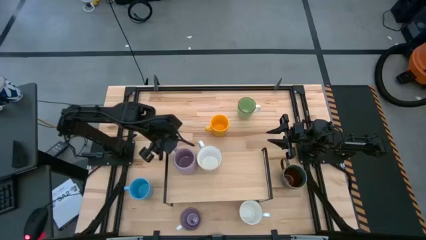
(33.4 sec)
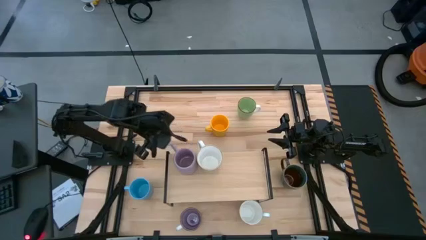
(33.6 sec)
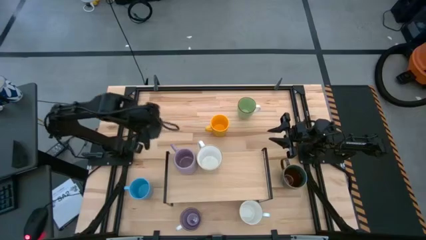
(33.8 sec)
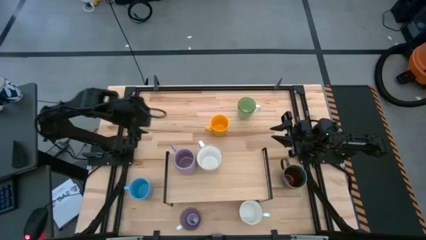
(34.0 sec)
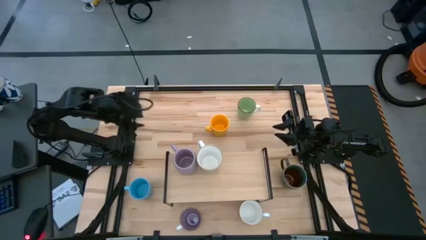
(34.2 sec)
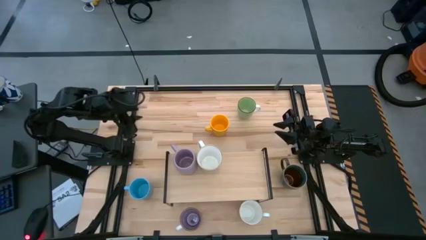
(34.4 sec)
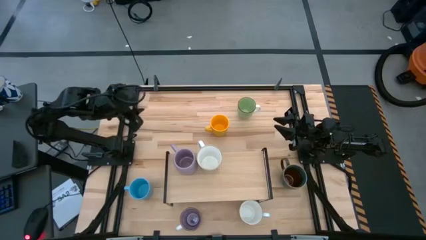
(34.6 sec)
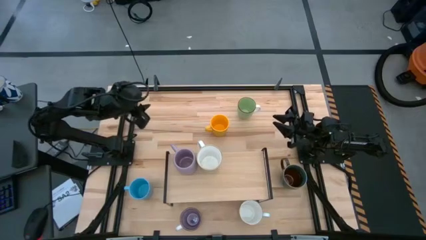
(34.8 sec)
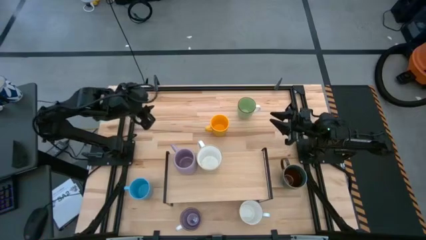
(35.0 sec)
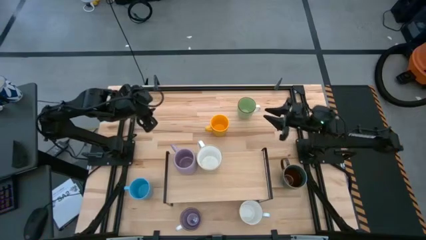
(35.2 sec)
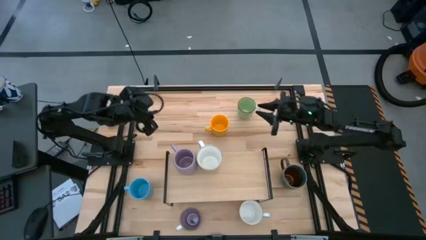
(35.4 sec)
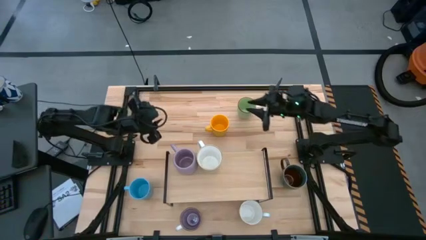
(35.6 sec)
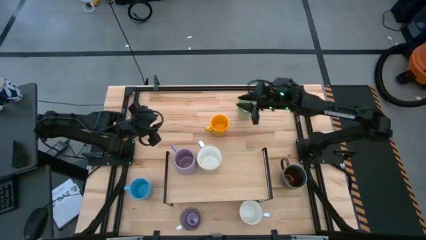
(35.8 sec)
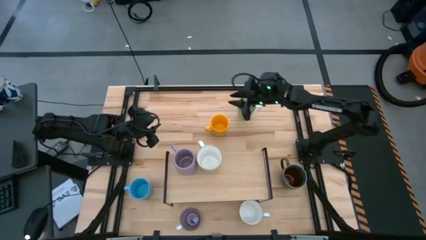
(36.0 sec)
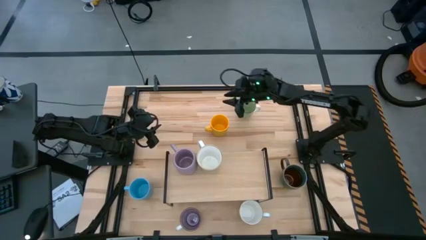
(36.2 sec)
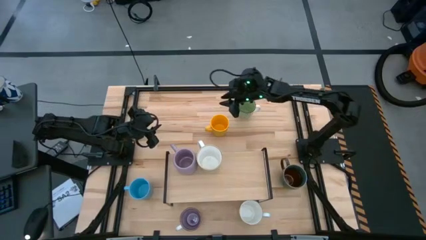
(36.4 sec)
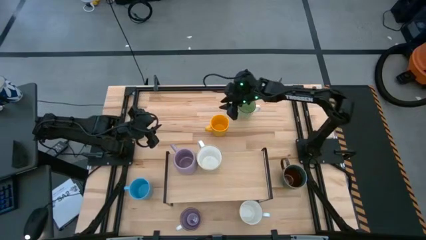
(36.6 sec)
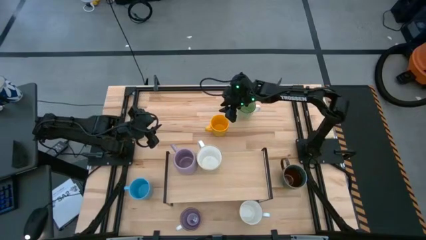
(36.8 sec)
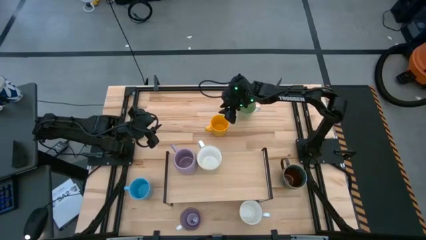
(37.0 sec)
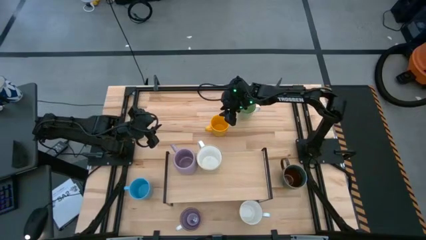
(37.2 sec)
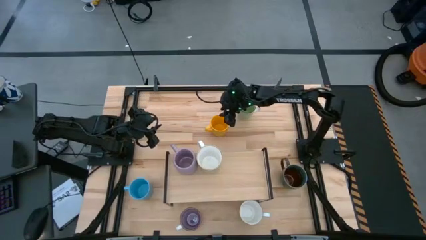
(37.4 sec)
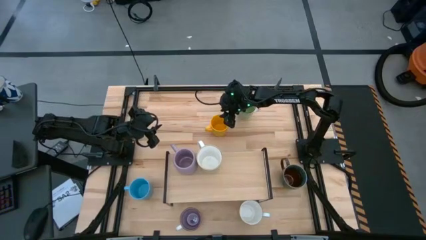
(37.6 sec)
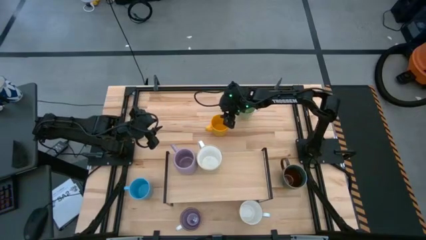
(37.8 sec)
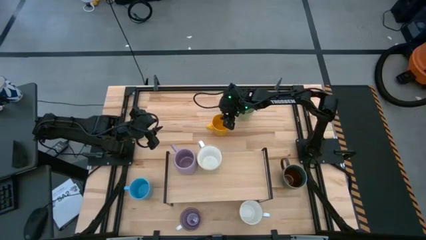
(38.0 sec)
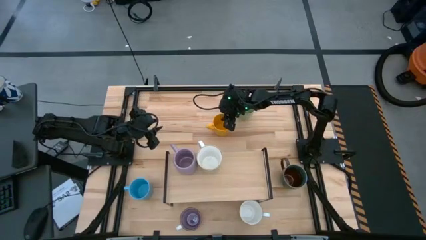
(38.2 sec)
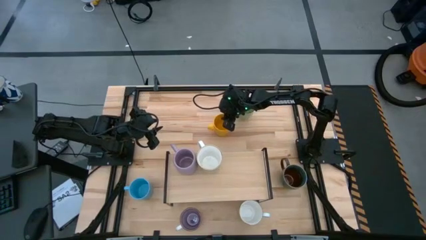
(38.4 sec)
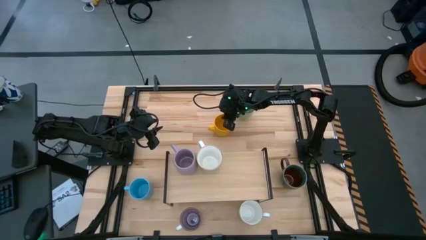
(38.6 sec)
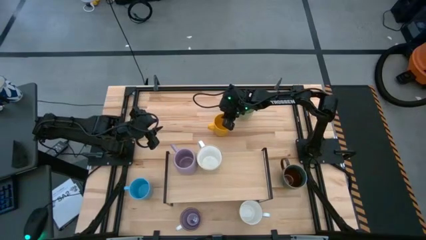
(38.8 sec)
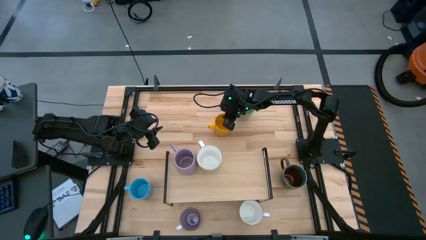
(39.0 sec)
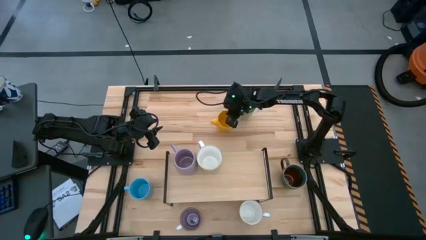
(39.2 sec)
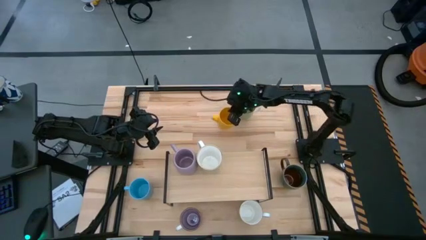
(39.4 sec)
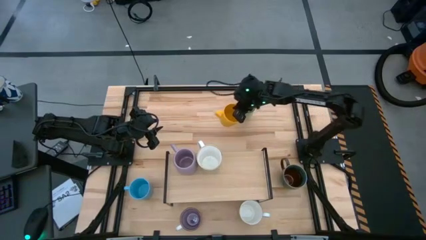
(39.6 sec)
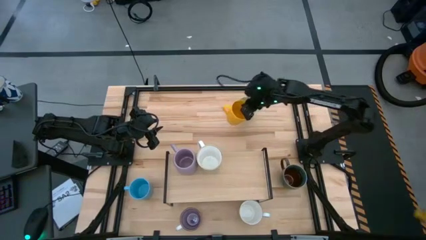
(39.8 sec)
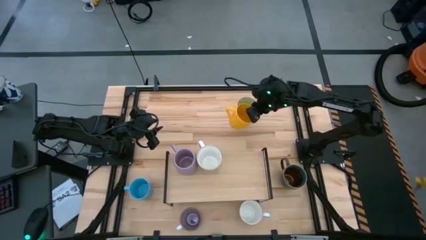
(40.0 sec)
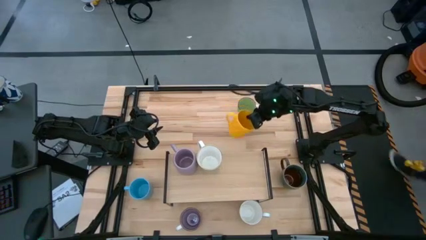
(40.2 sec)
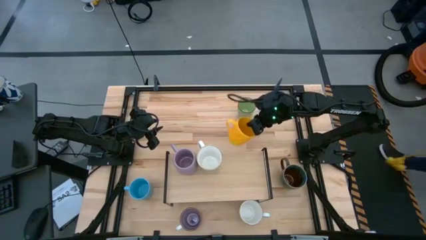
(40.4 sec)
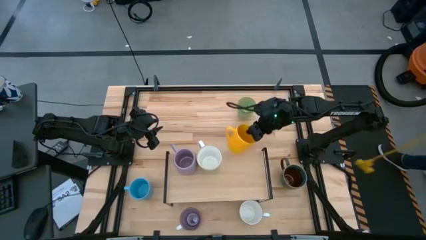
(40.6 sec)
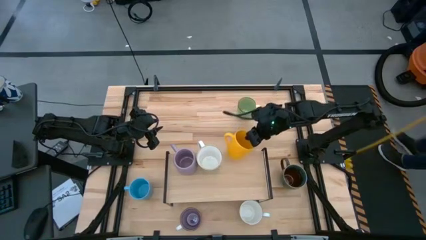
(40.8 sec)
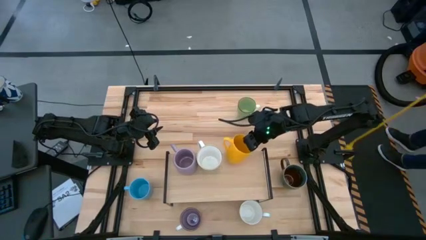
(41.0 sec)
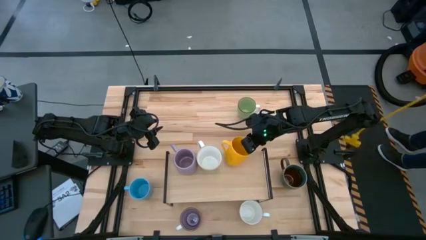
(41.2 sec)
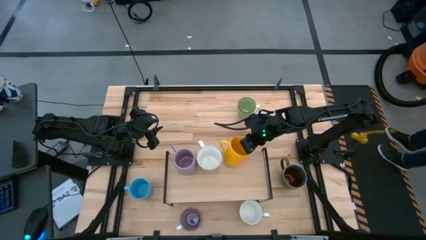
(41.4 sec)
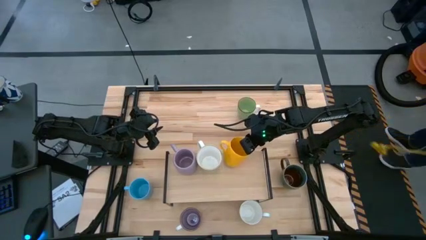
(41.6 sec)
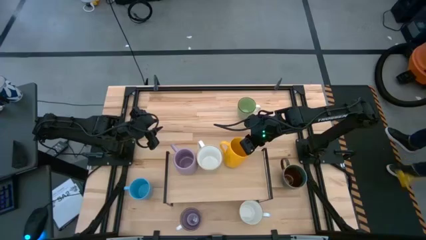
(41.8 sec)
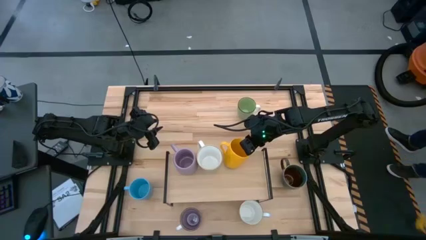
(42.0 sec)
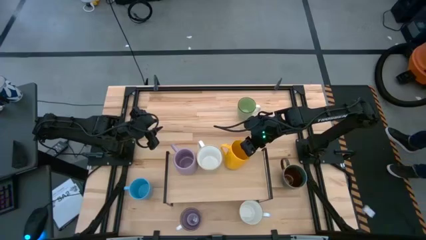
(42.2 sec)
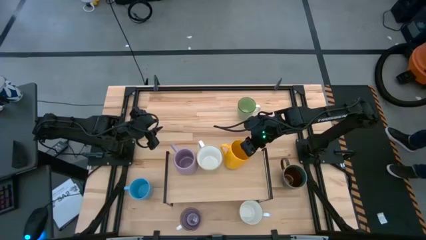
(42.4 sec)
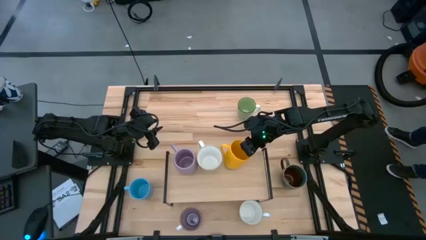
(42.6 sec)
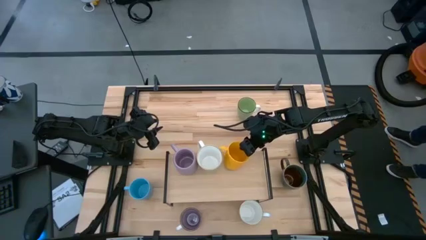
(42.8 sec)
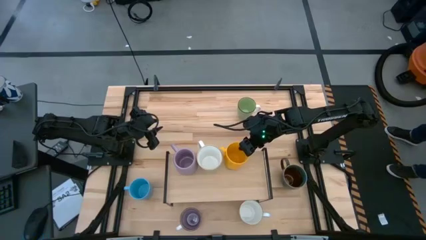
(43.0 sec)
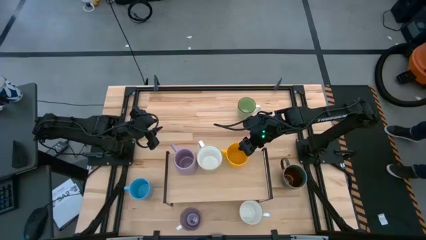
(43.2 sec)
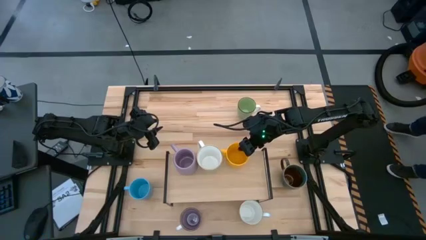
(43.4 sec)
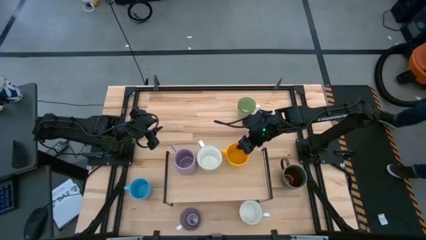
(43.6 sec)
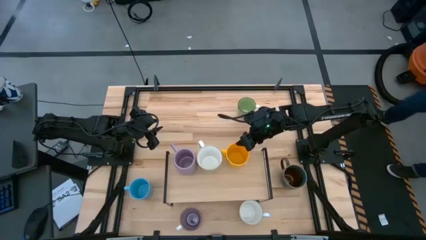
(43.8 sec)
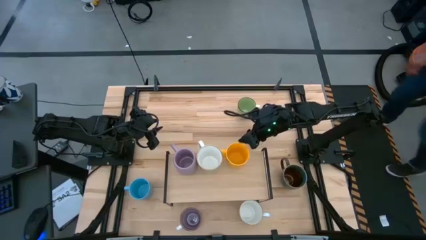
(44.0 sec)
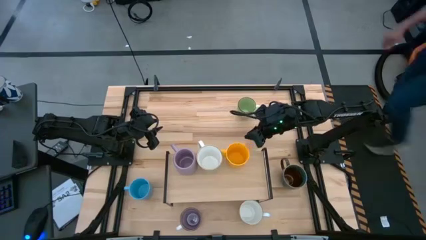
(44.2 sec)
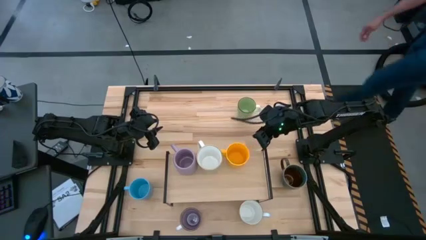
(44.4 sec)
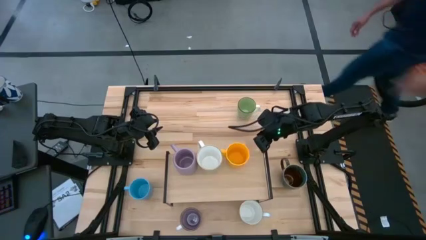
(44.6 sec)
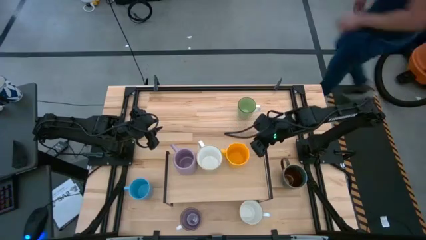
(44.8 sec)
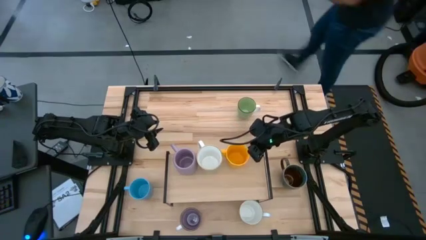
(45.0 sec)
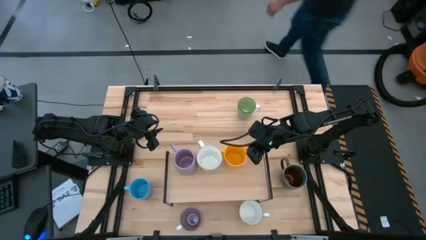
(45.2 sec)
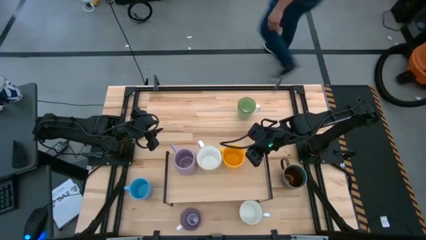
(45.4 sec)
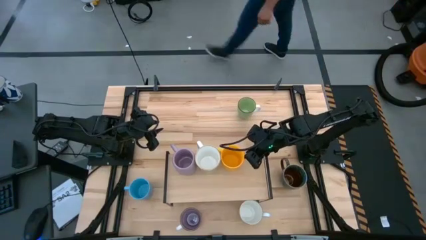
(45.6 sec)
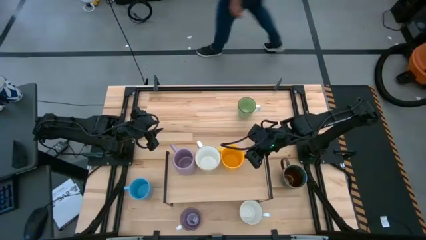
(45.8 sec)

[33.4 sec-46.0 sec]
Task: Place coffee mugs
Put the yellow mug on the shelf

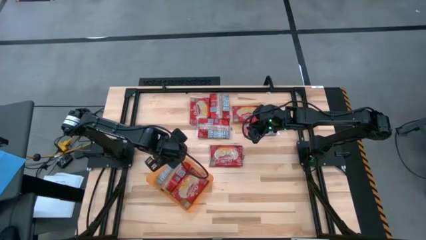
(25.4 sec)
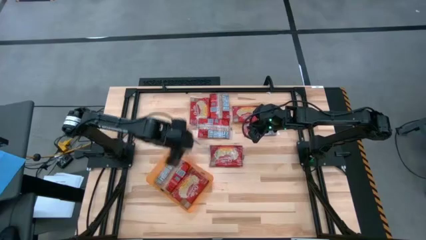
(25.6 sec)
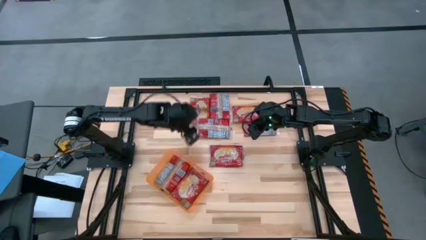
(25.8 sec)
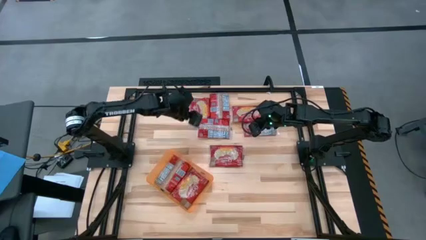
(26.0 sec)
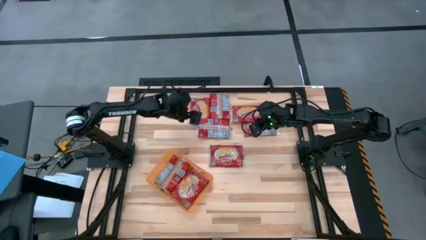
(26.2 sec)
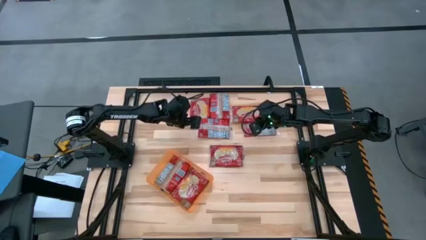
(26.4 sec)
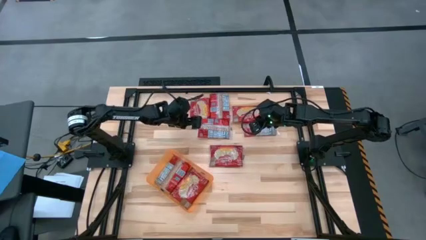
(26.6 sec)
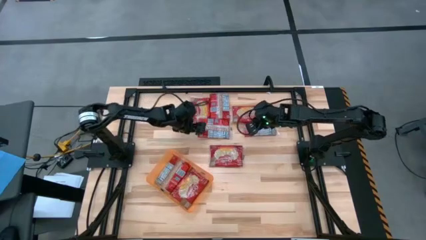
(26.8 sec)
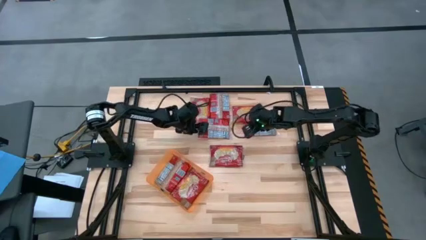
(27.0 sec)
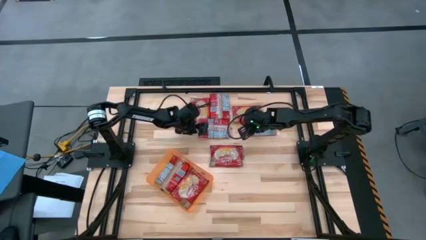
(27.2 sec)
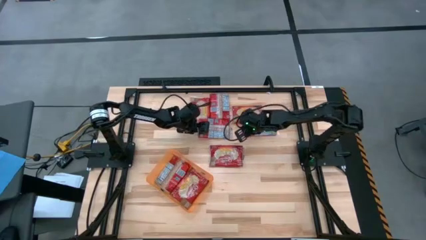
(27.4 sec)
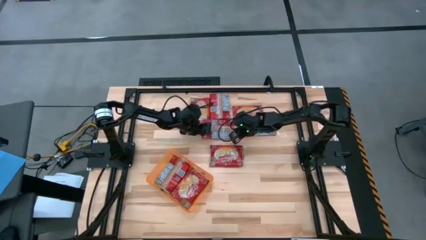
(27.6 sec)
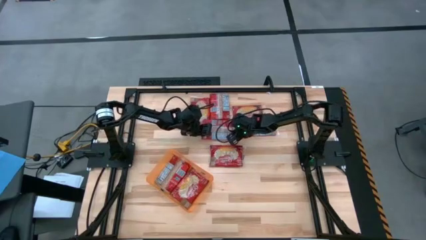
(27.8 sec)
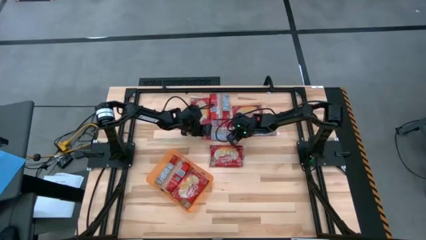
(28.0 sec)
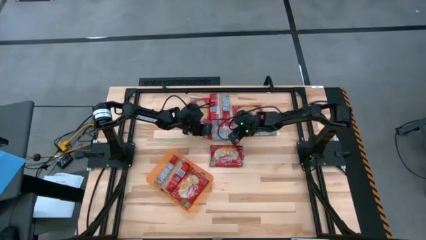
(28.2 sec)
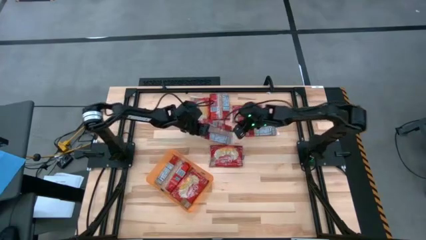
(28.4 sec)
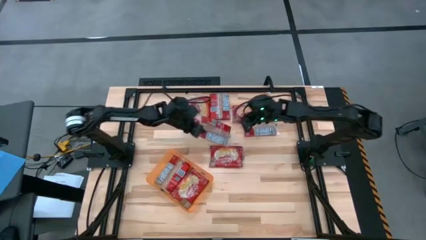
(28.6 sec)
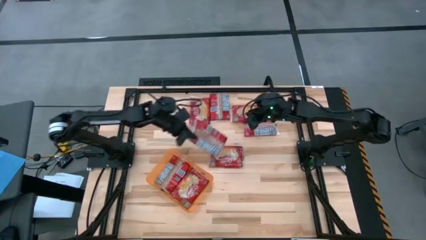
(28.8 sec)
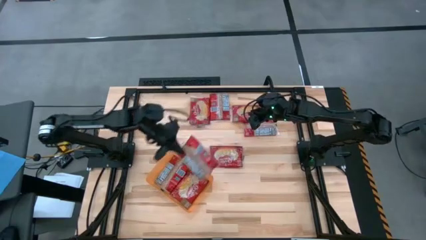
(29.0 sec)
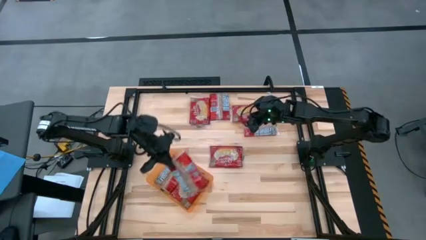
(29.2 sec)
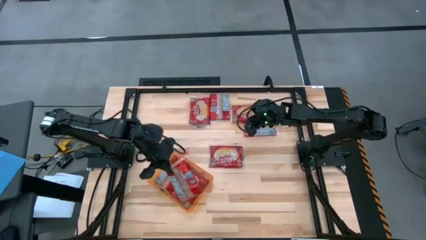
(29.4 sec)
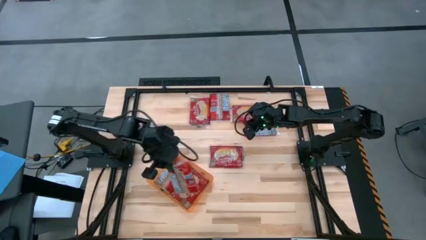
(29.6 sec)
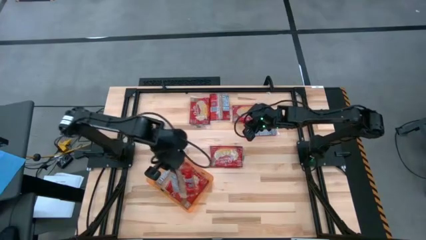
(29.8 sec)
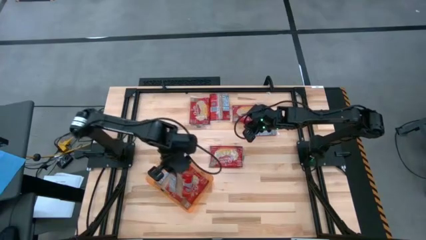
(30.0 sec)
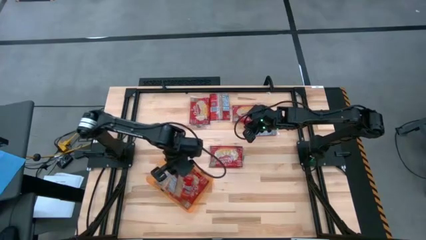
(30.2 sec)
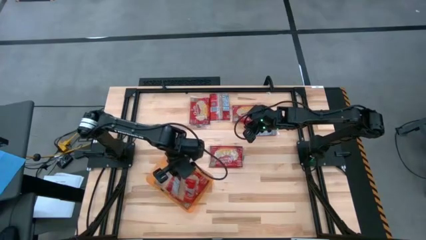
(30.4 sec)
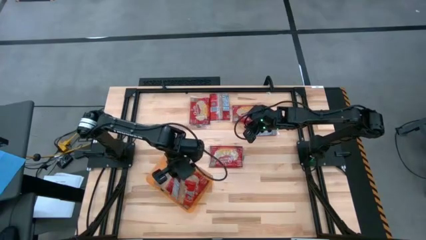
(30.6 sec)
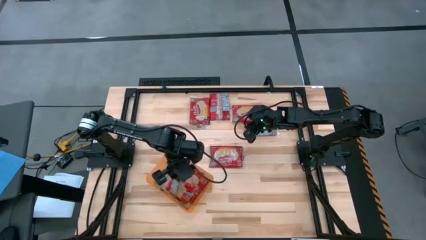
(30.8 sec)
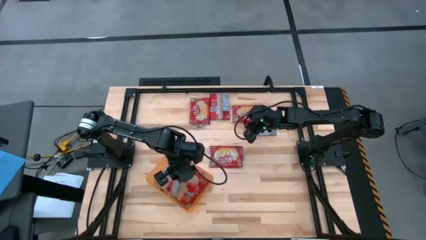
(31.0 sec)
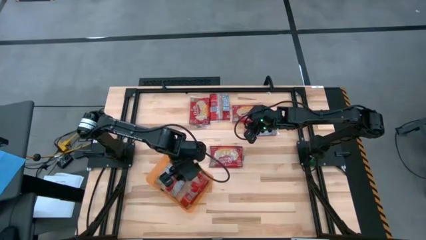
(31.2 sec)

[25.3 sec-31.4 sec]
Task: Sort popcorn bags into baskets
Put the popcorn bag into the orange bin
